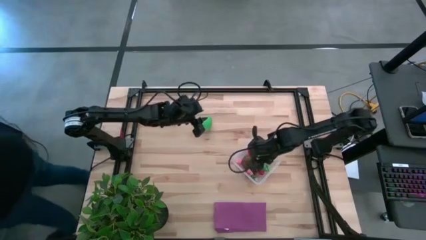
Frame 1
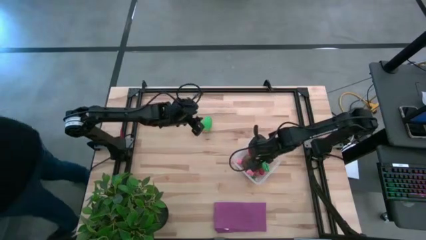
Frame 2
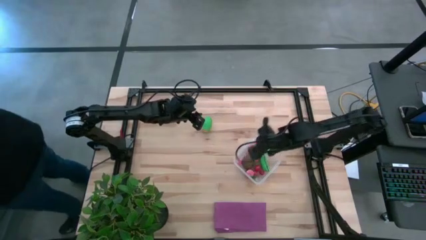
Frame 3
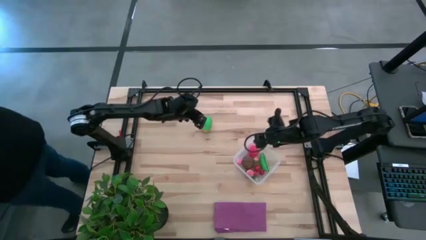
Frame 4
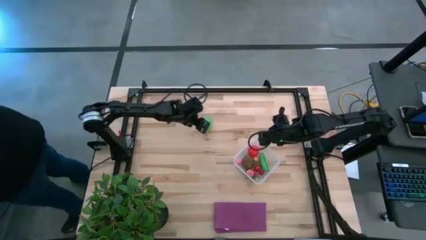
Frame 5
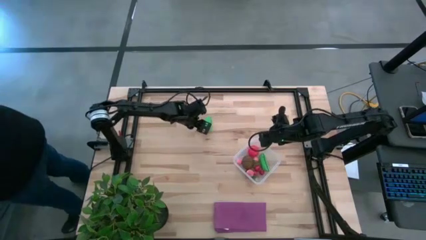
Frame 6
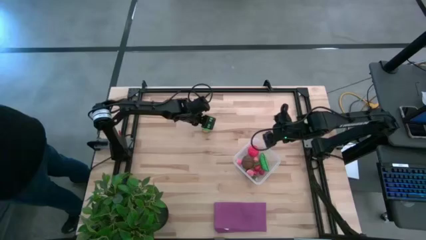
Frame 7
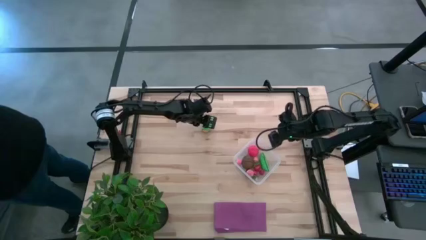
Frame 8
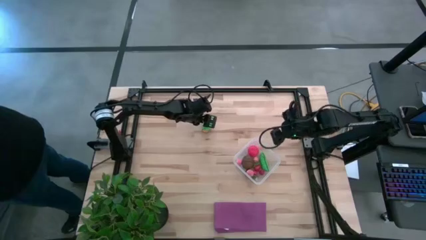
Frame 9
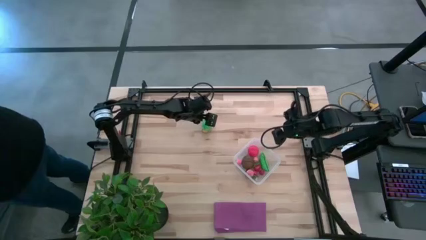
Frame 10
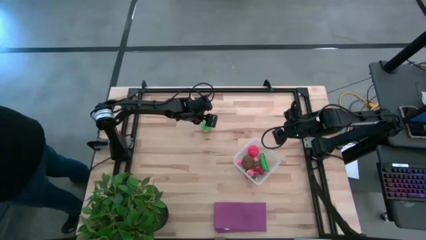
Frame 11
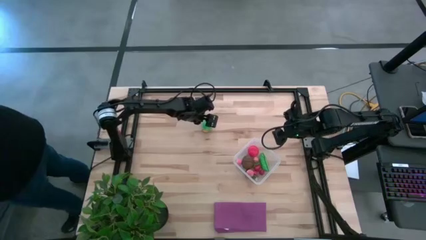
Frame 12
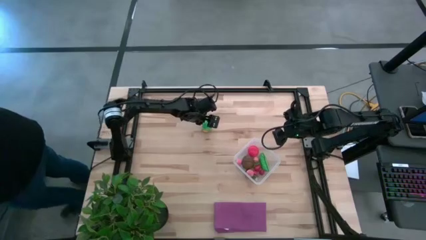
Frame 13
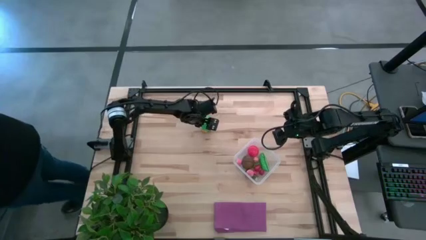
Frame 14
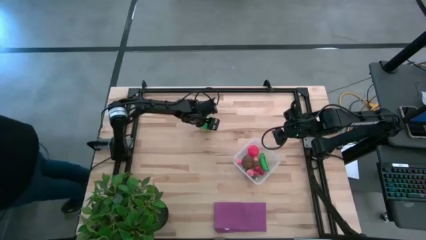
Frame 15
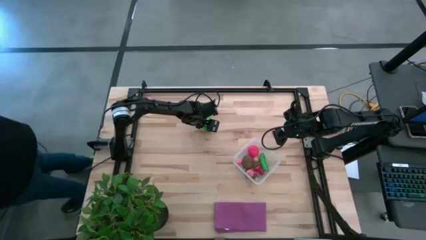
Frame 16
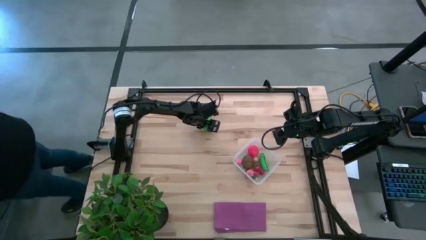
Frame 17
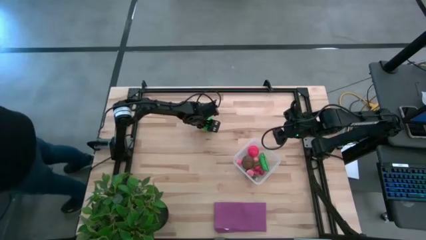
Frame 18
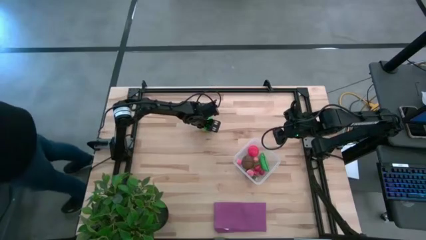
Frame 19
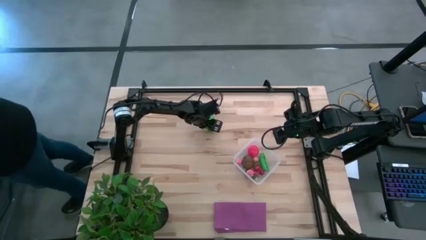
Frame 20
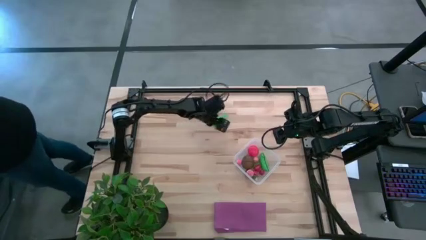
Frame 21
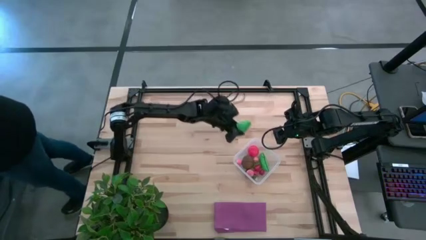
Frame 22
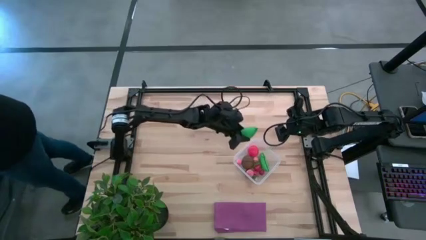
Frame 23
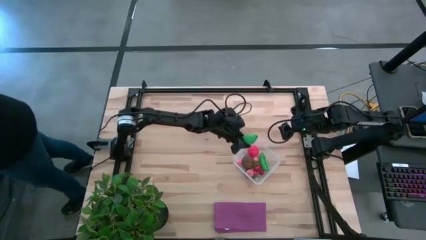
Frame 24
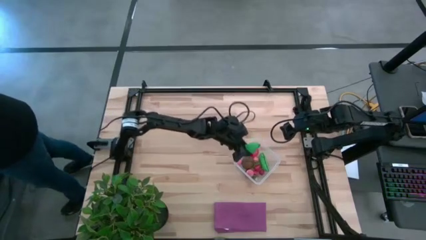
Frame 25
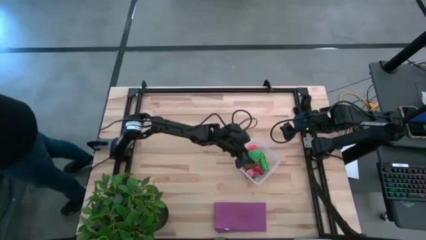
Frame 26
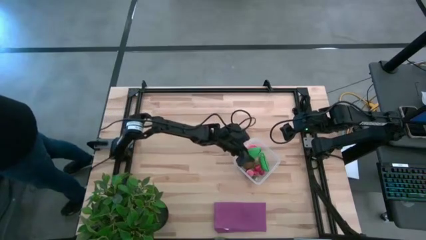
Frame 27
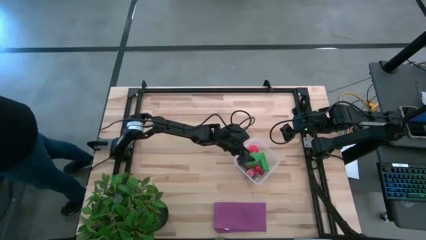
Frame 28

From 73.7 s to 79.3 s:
Task: Pick and placing Produce into tupperware
Put the green corn into the transparent bin

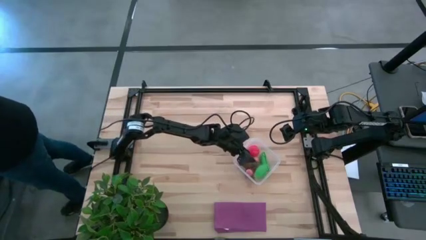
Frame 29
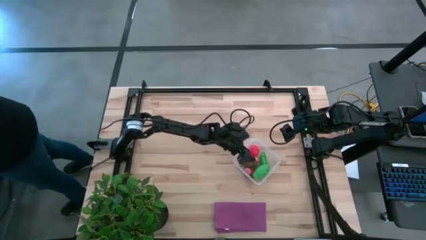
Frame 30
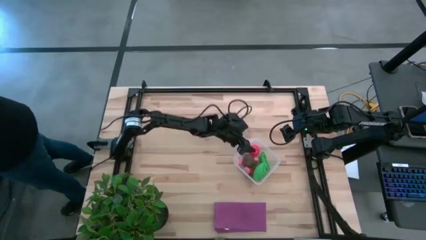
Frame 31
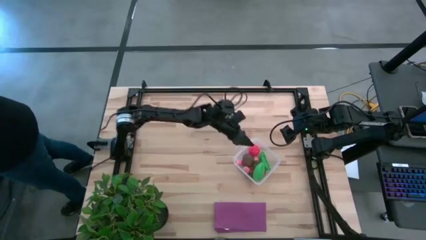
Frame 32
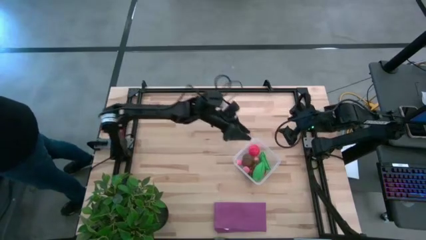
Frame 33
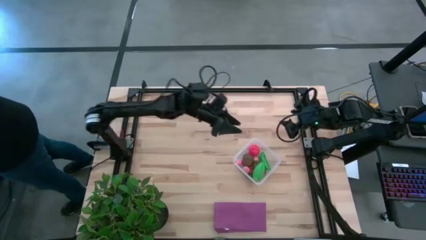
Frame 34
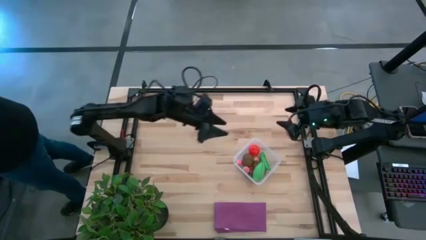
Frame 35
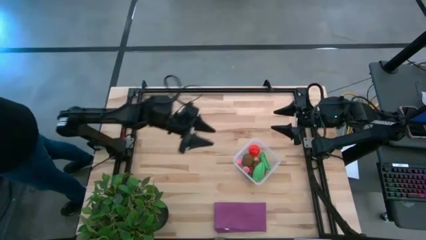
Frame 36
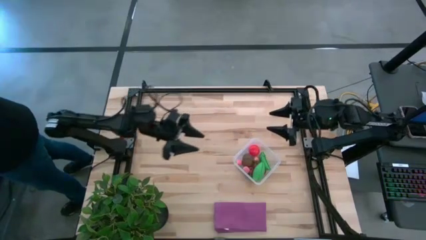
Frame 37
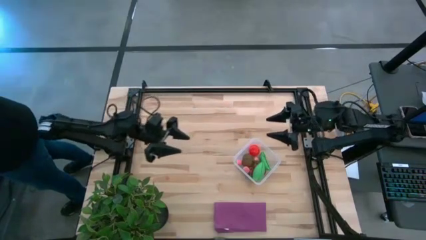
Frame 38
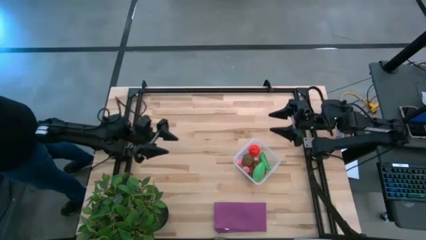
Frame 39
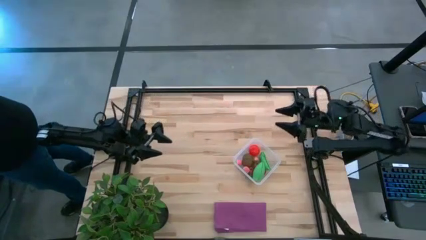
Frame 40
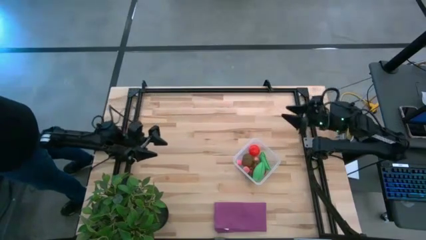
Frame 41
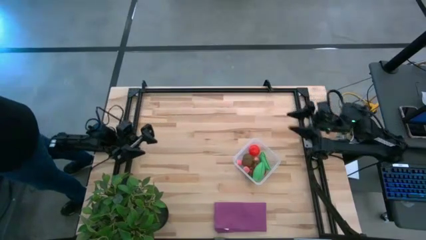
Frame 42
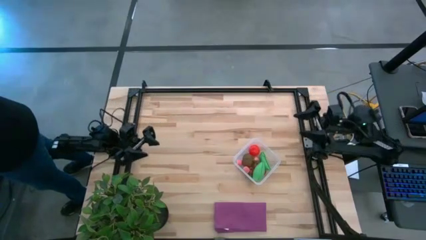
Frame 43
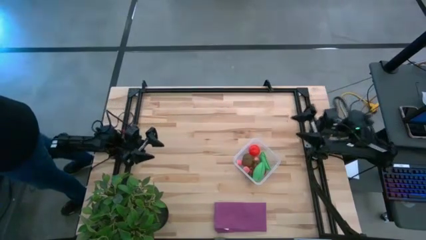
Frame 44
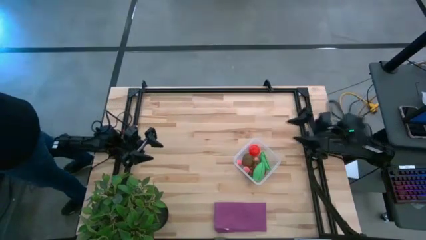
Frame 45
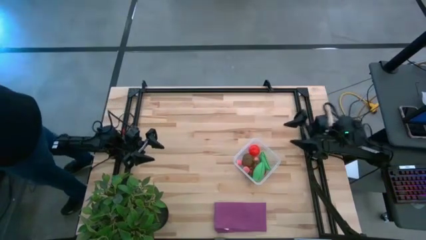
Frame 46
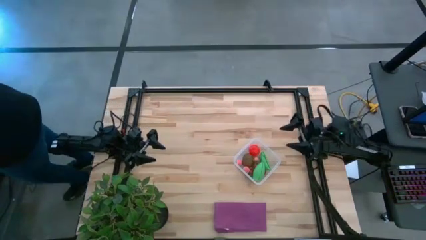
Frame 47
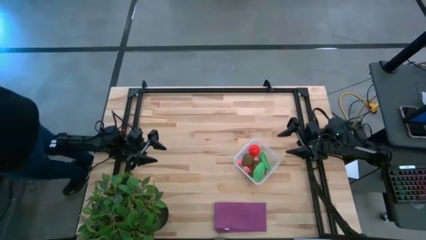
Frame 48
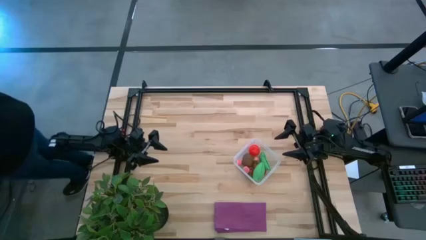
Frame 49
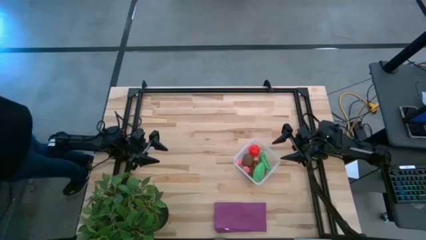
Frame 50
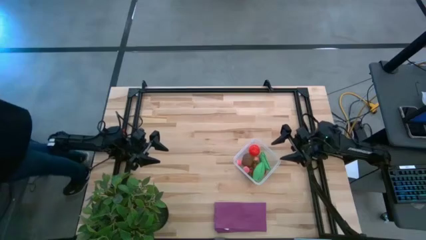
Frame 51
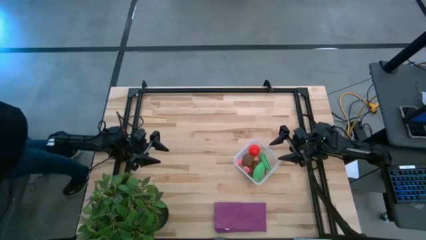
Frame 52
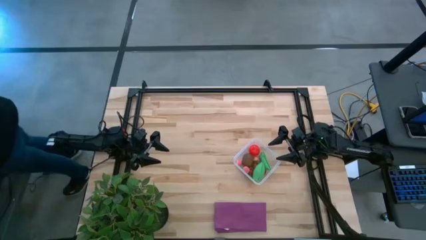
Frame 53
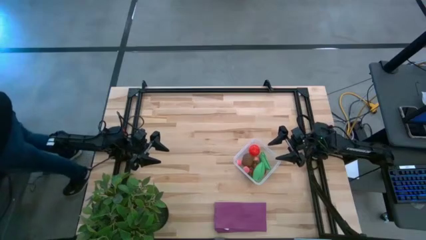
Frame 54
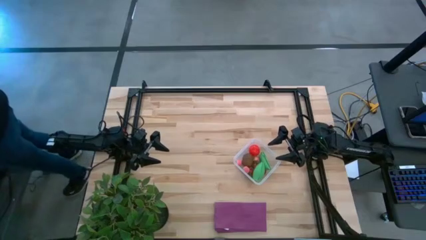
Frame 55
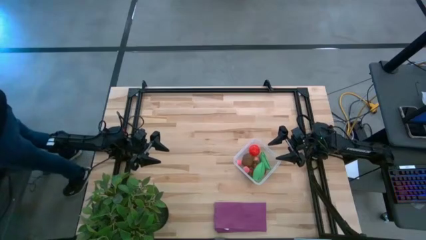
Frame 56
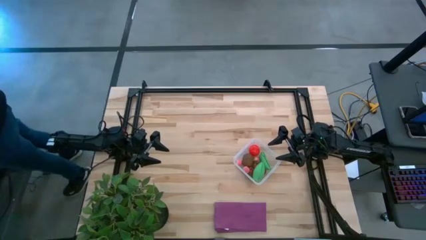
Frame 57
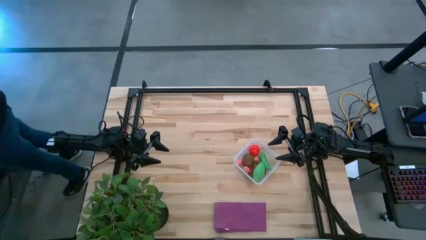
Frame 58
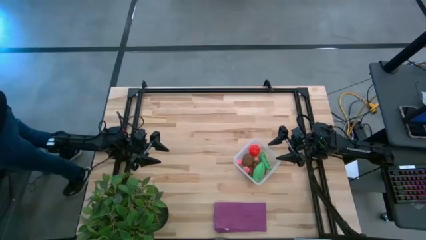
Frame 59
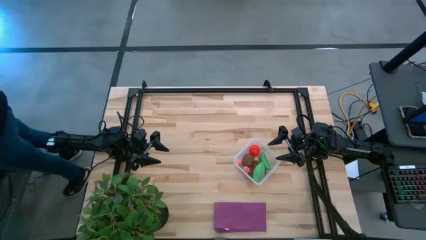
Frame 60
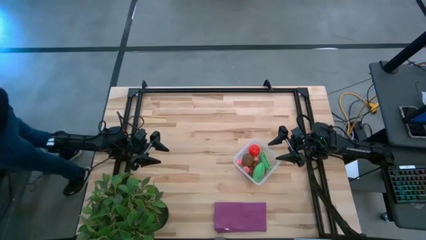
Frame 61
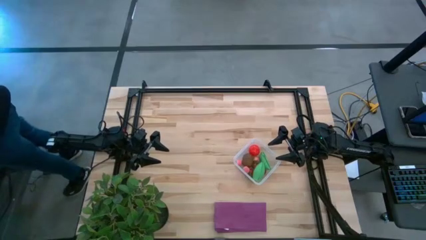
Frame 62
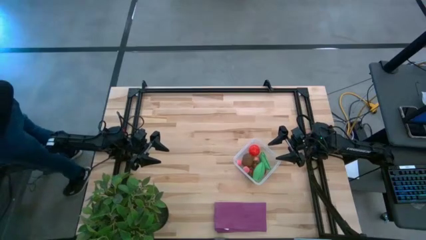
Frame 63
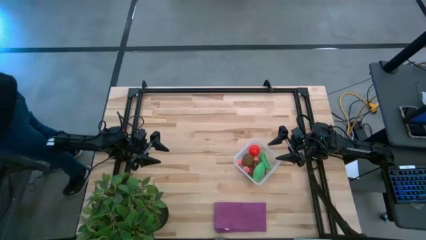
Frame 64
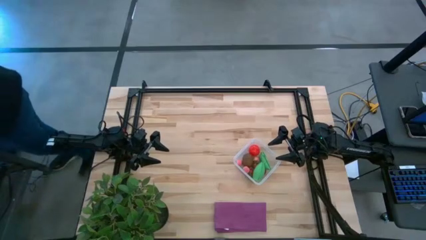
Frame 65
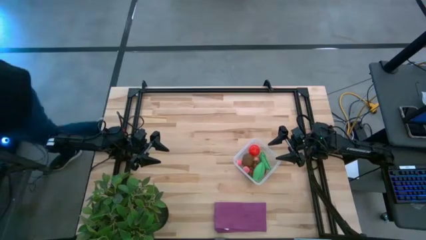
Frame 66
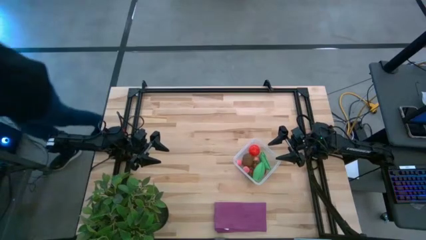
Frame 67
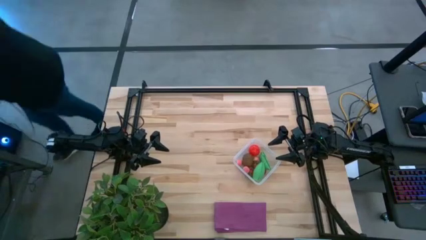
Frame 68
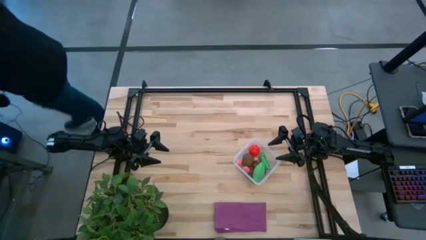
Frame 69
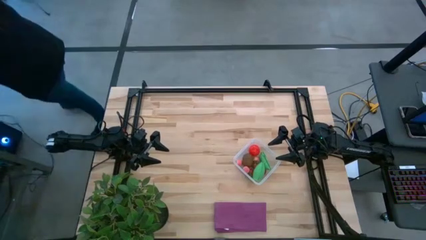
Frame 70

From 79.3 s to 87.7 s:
Return to Home Position
